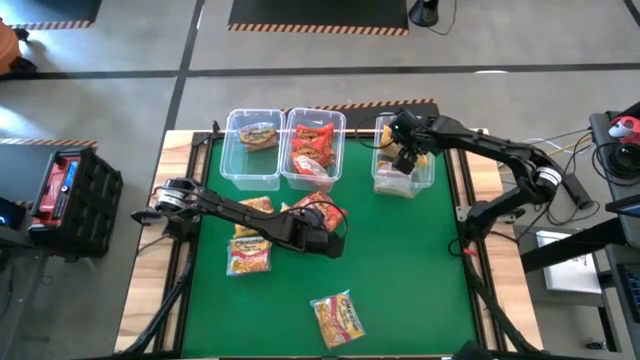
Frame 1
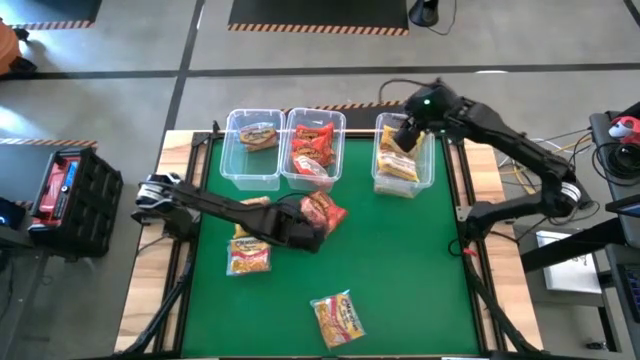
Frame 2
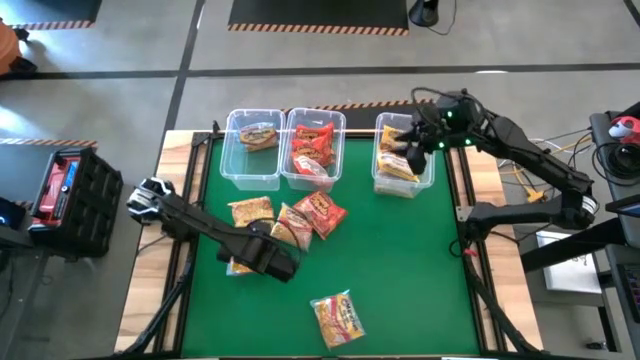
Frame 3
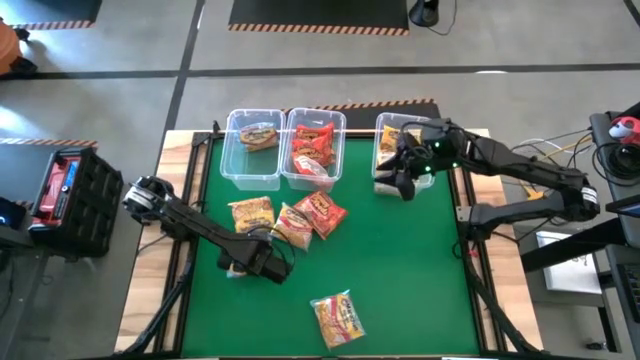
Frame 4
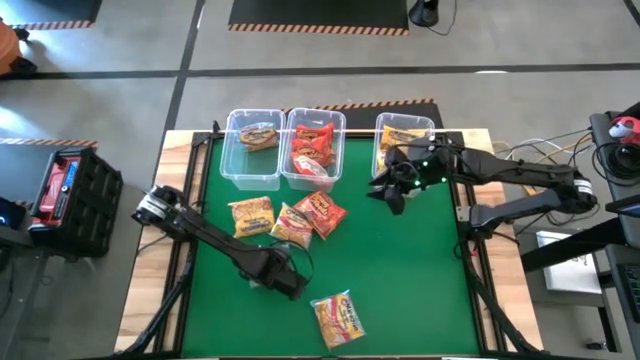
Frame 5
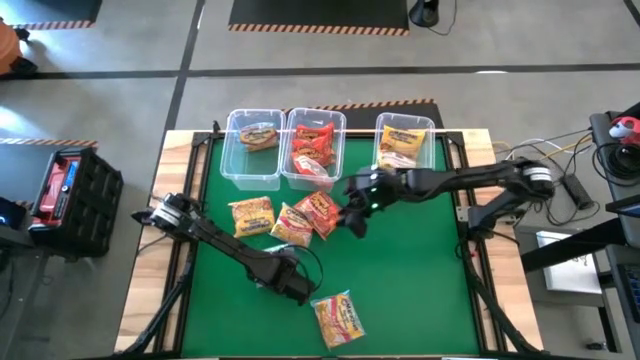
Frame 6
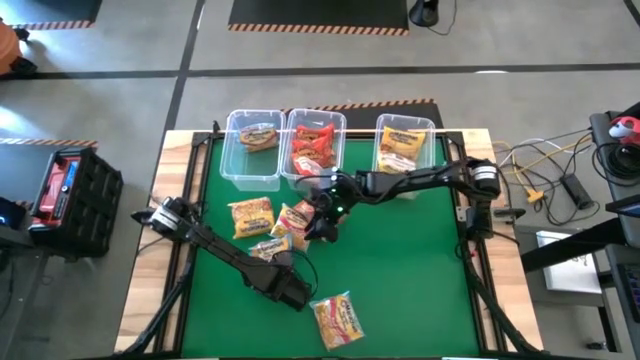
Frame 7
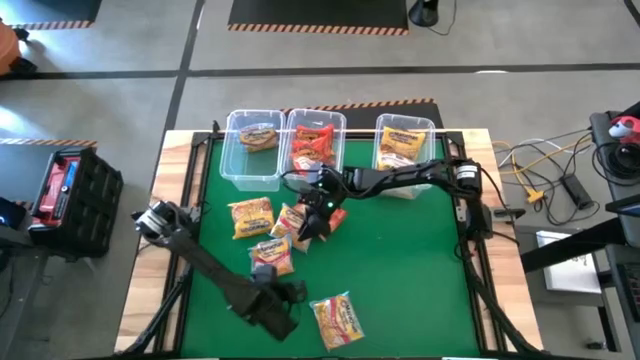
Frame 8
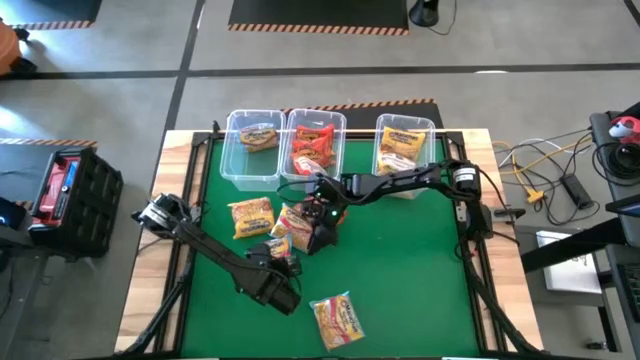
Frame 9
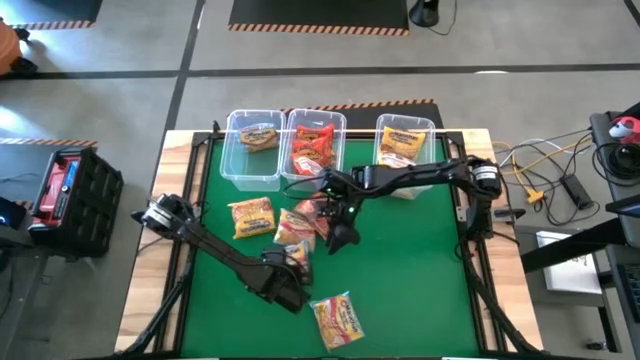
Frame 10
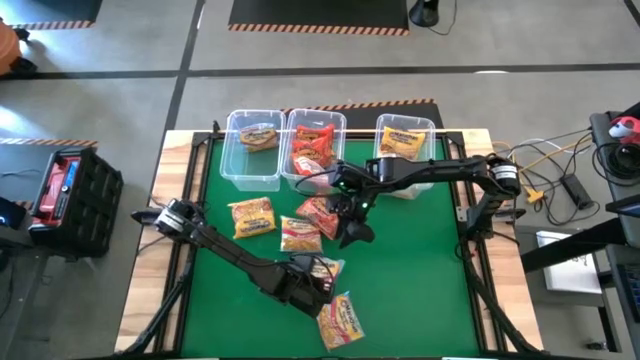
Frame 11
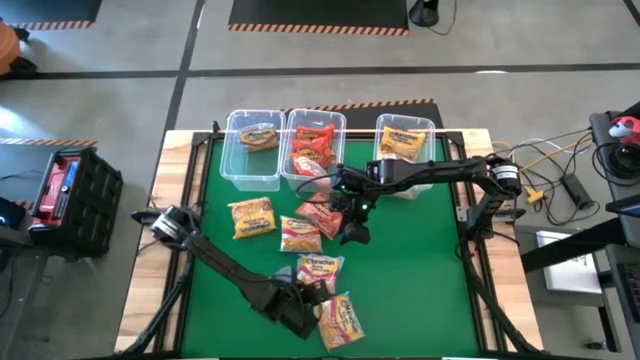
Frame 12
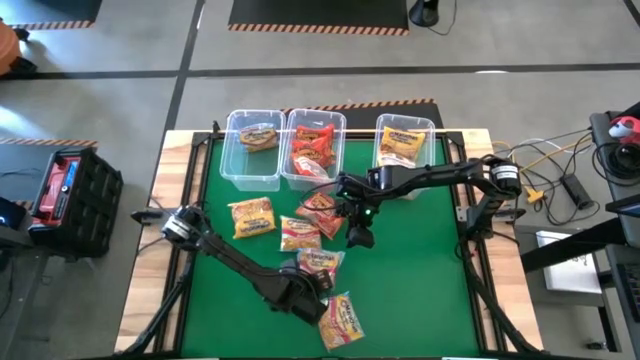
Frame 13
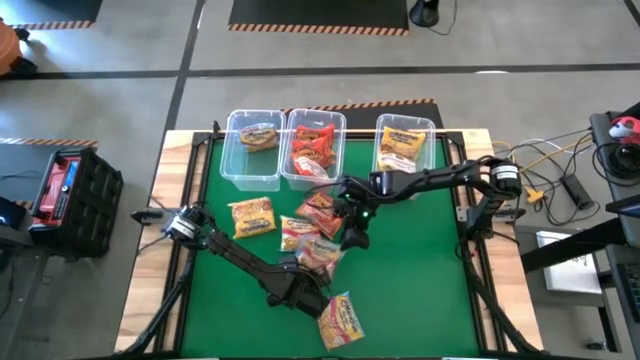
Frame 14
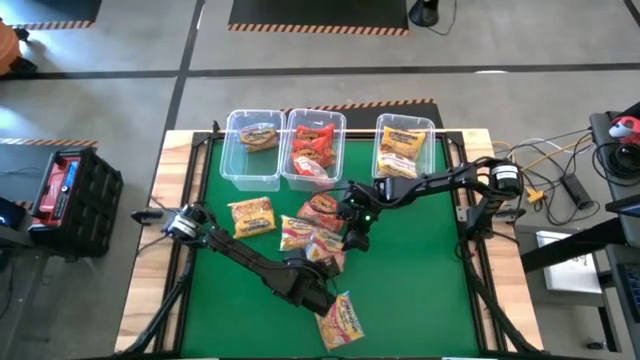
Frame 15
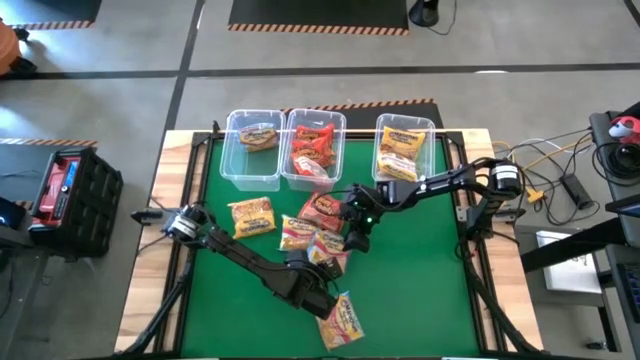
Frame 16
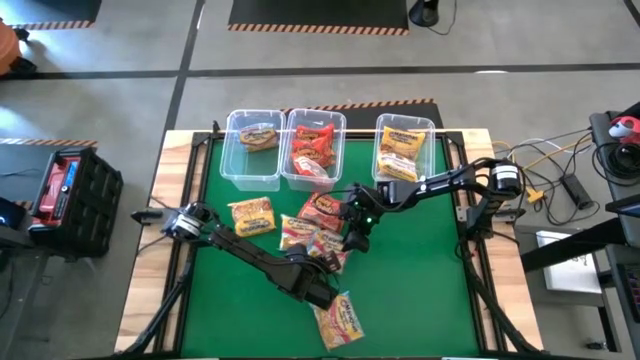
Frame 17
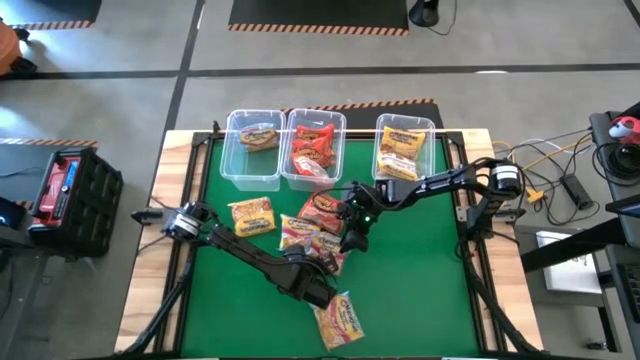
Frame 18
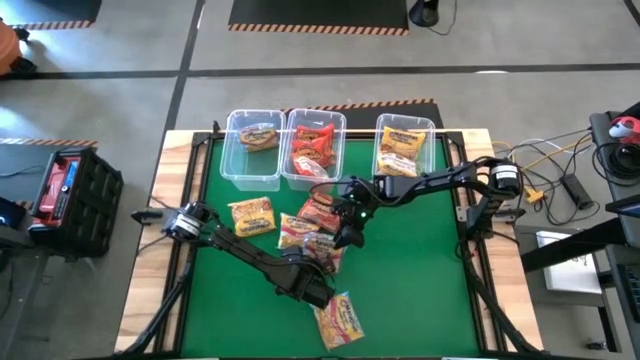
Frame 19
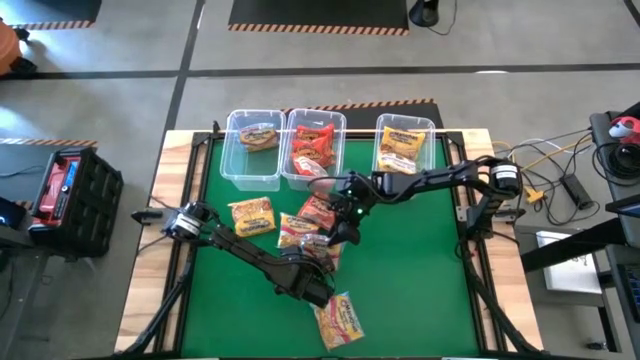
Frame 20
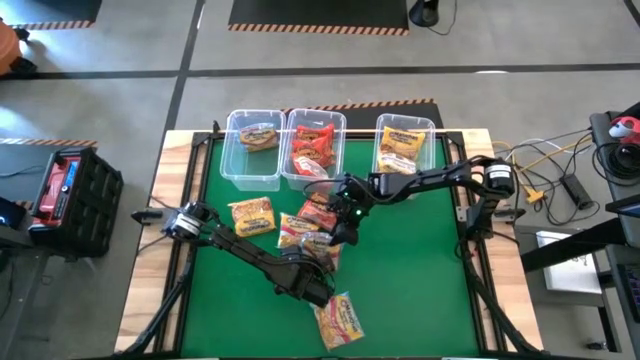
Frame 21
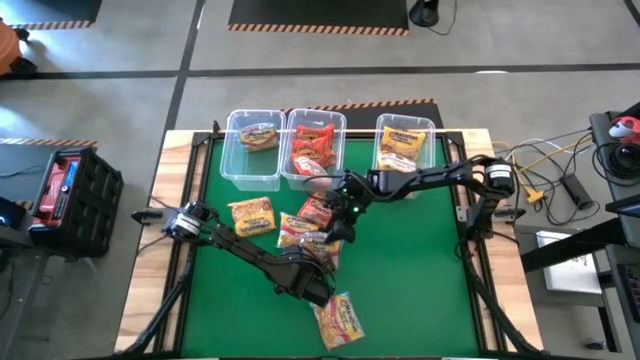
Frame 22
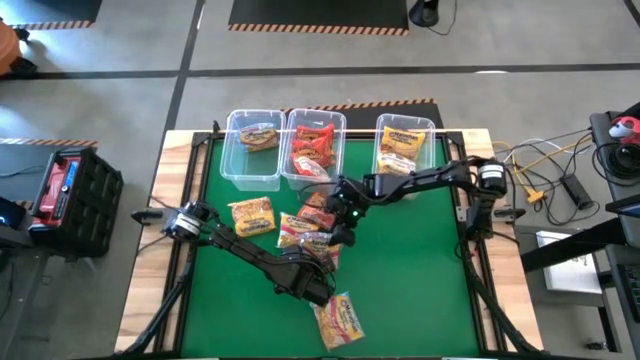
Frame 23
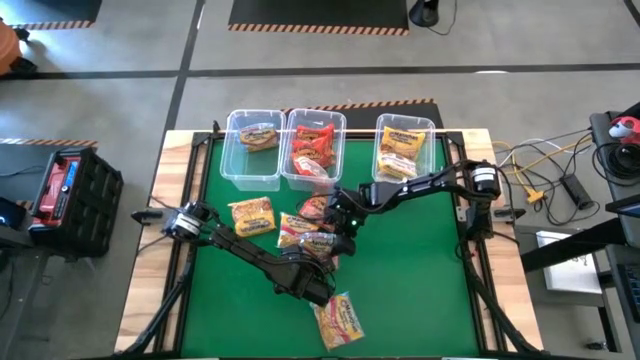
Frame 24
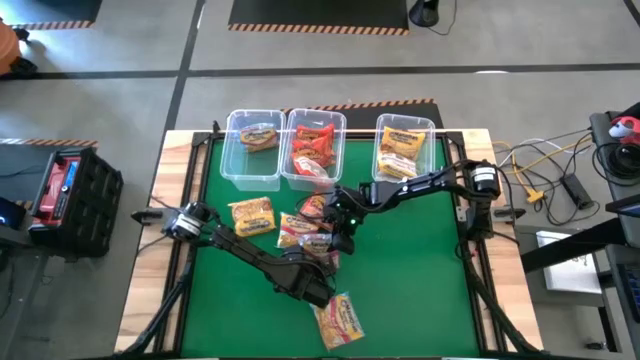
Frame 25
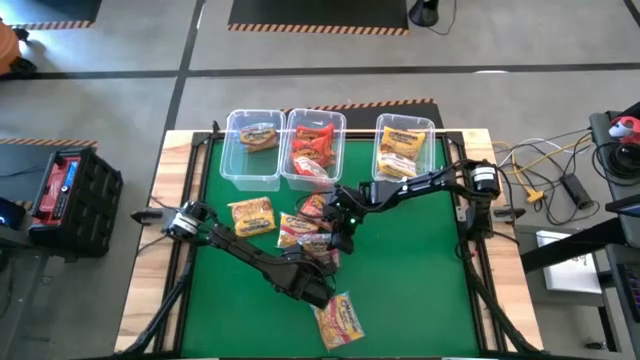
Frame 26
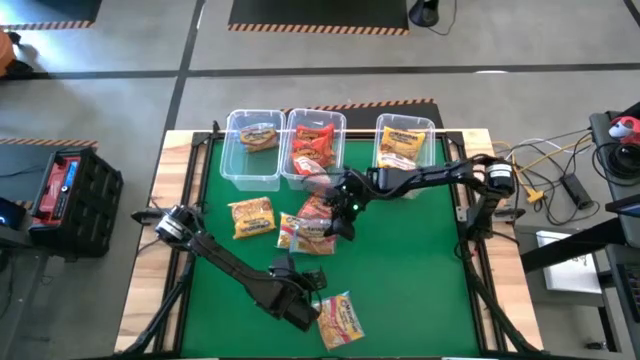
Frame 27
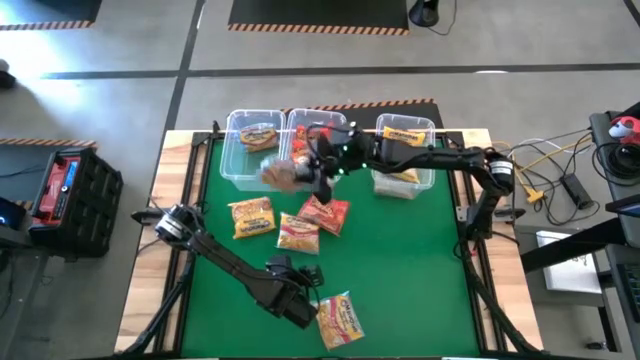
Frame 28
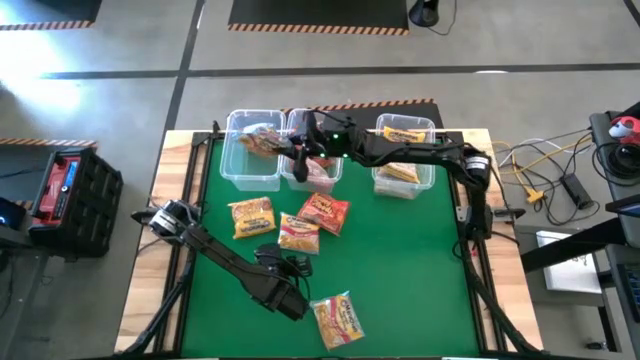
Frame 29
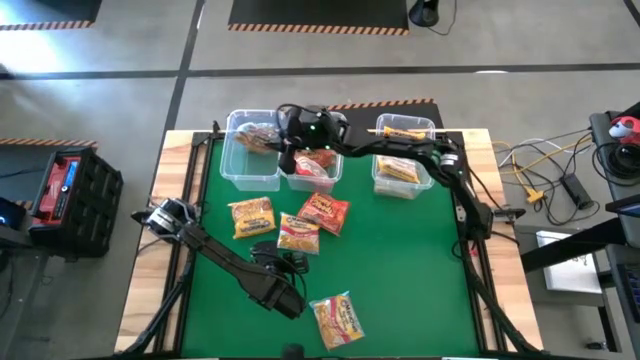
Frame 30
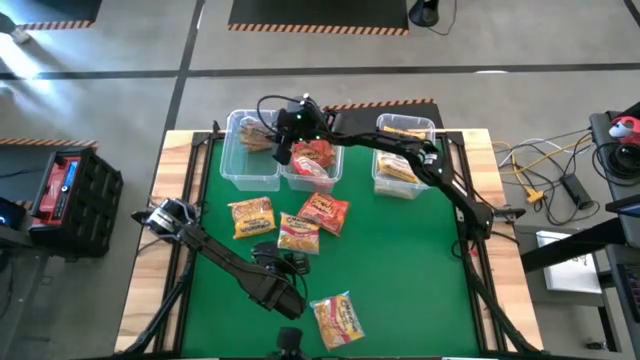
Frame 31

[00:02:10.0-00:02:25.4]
Task: Sort Maruchan noodles
Put the middle left blue noodle pack into the top left transparent bin

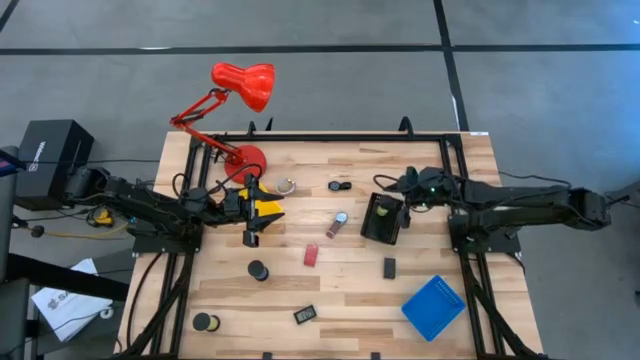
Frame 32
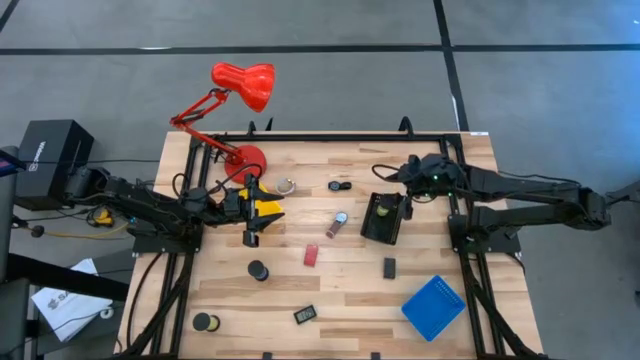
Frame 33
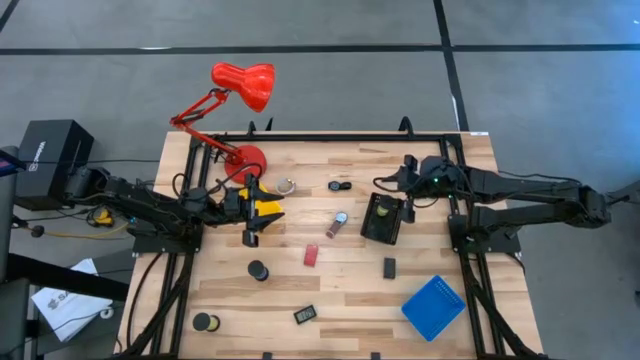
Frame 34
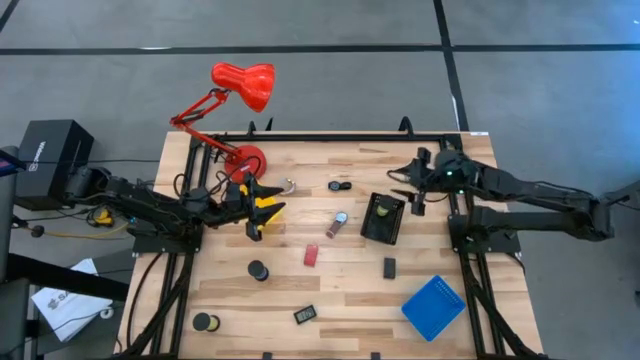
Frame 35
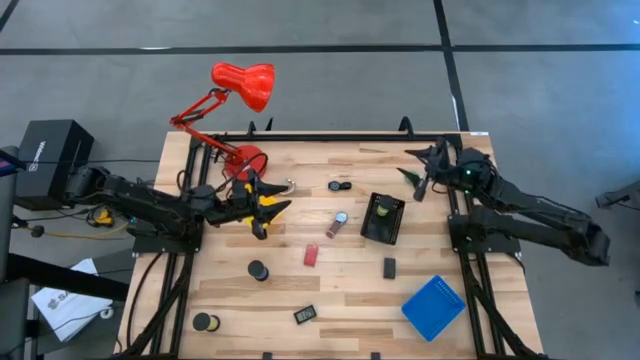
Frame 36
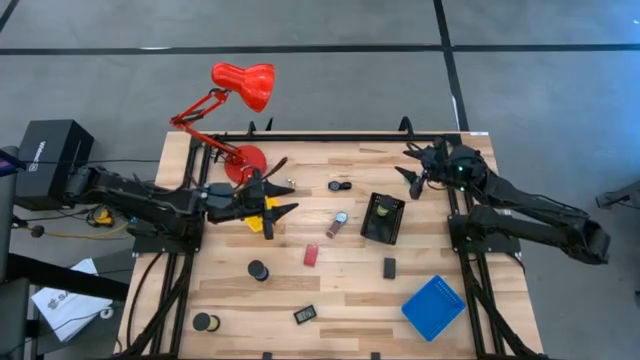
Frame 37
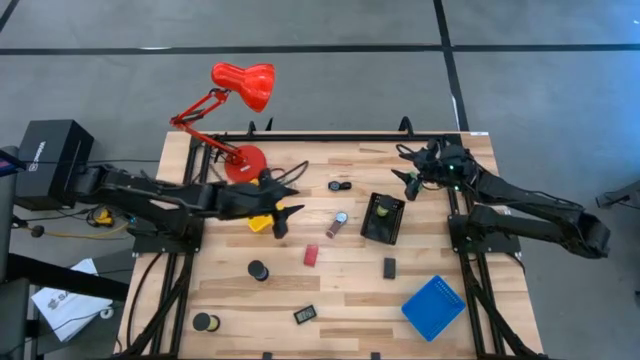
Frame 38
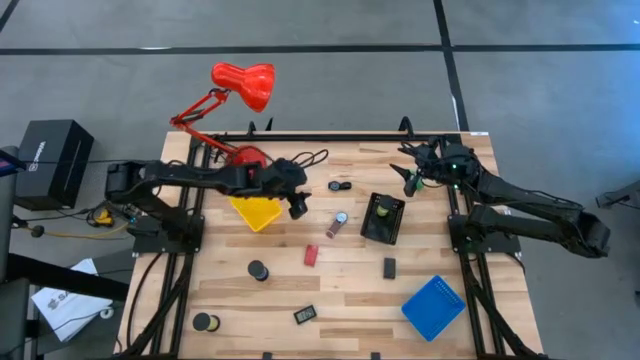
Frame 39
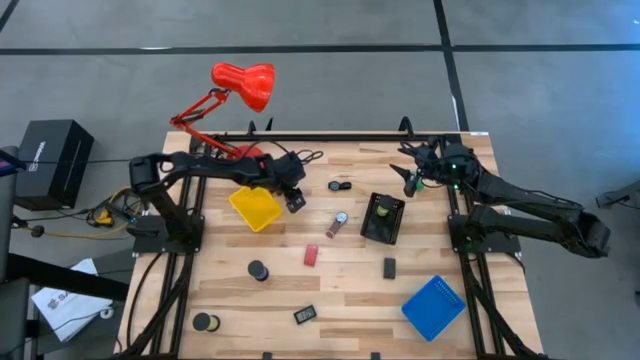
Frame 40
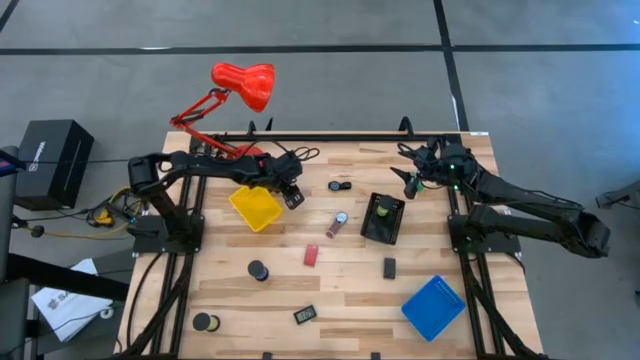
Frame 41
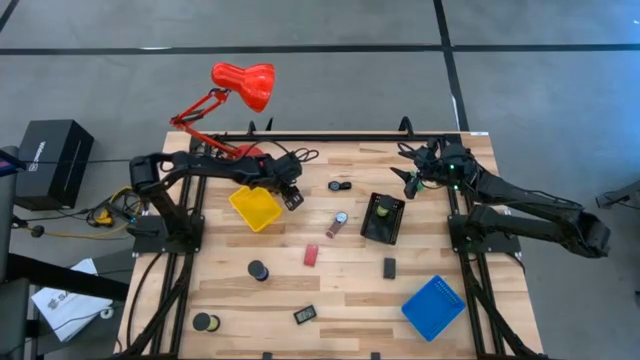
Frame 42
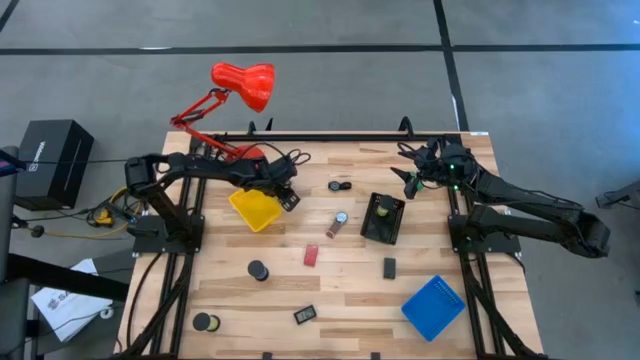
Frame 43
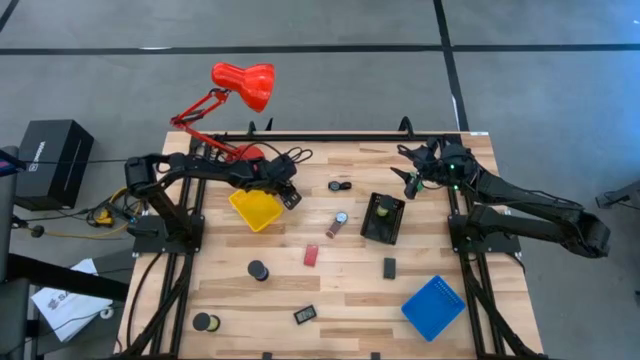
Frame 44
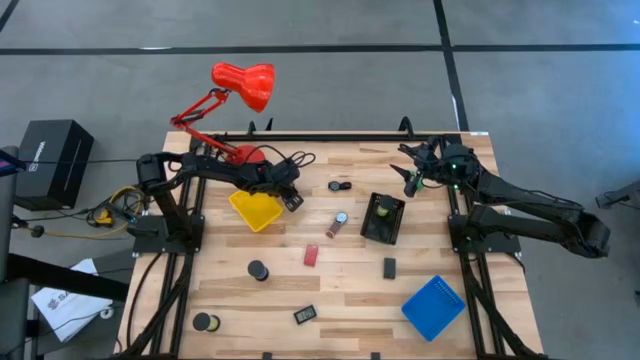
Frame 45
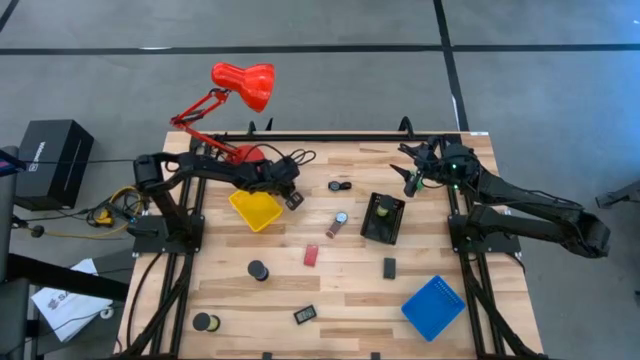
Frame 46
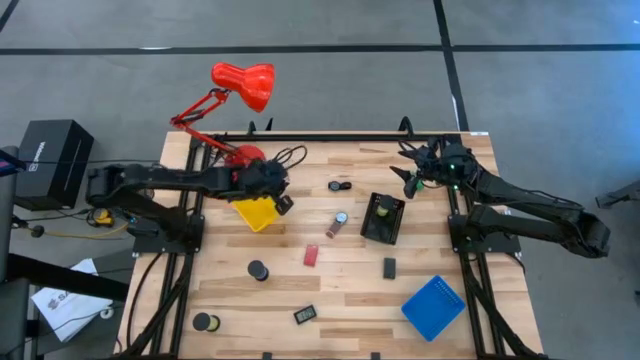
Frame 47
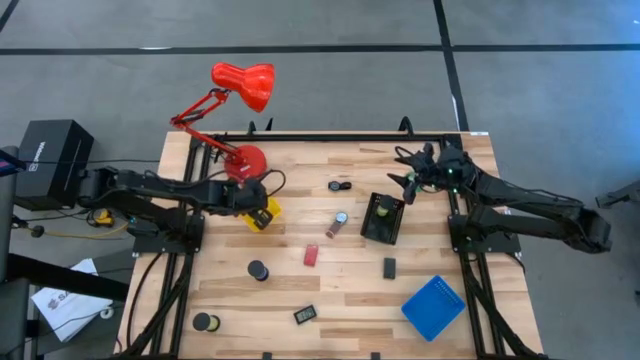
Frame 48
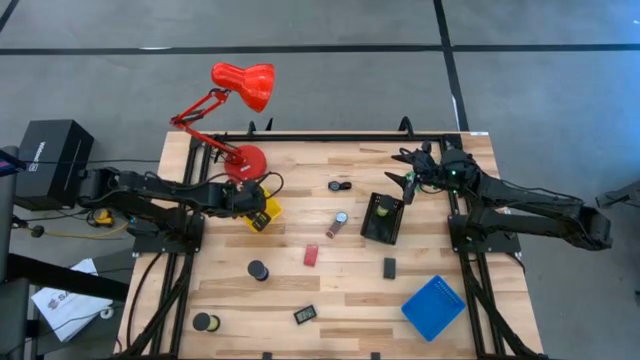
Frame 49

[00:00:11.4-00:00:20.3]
Task: Pick & Place Office items
Put the white wristwatch into the yellow bin
